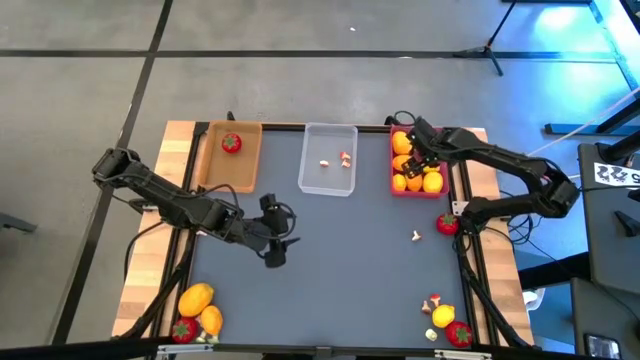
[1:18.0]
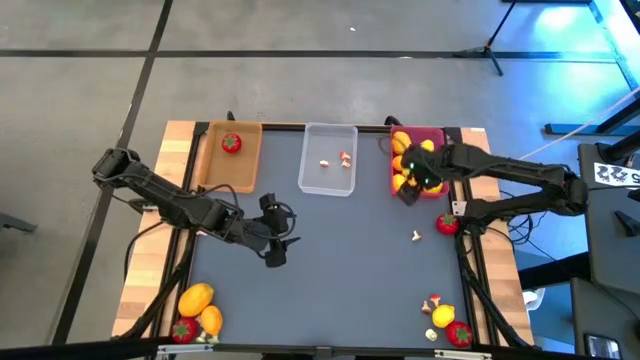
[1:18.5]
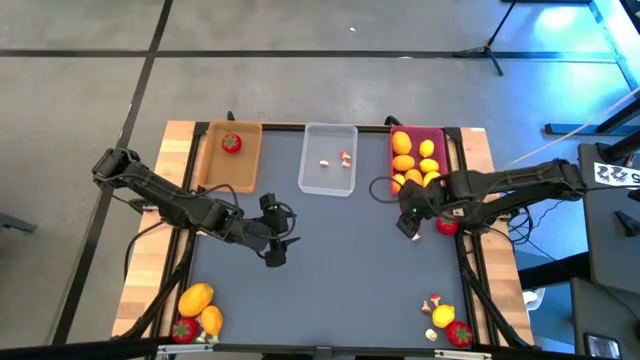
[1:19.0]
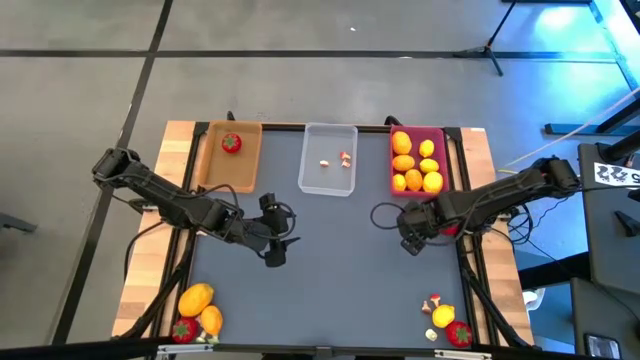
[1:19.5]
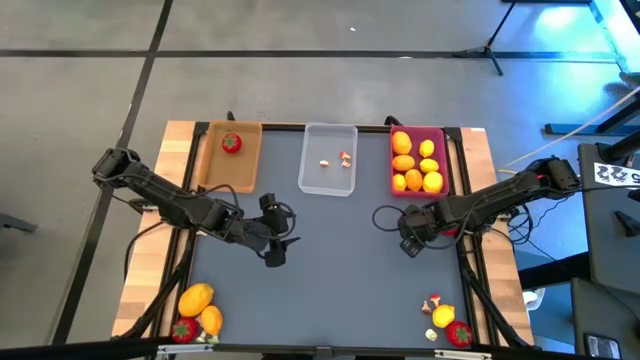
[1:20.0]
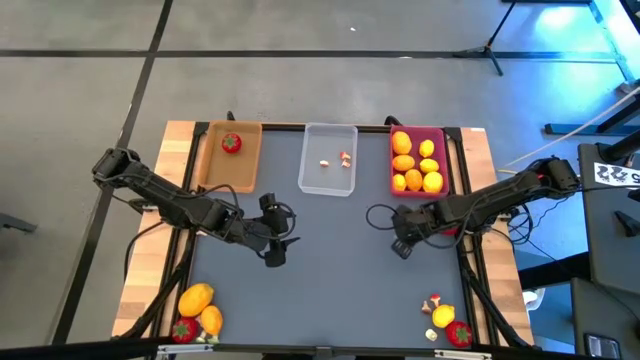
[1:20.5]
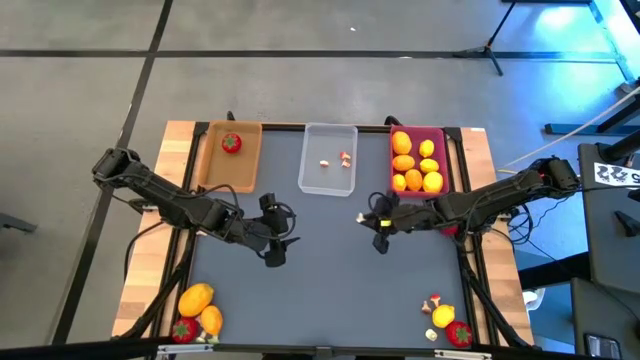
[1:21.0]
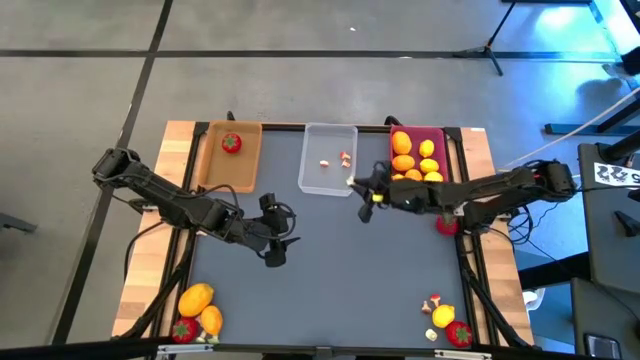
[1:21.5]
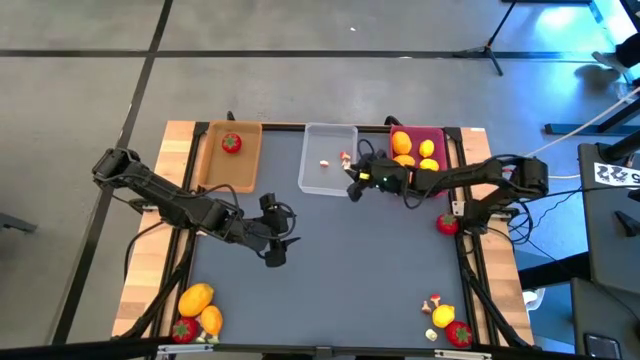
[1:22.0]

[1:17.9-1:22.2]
Task: Sort produce into baskets
Put the mushroom into the transparent bin

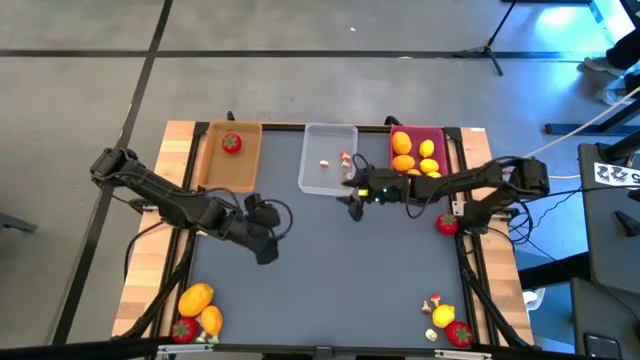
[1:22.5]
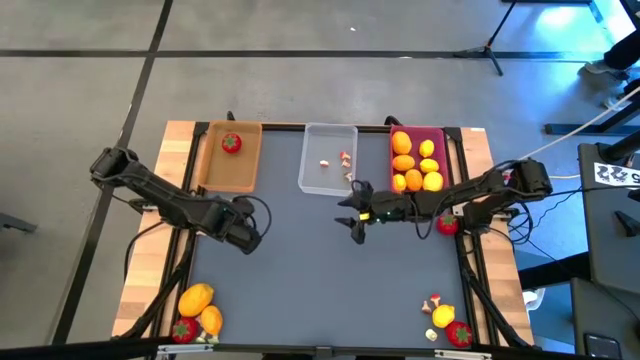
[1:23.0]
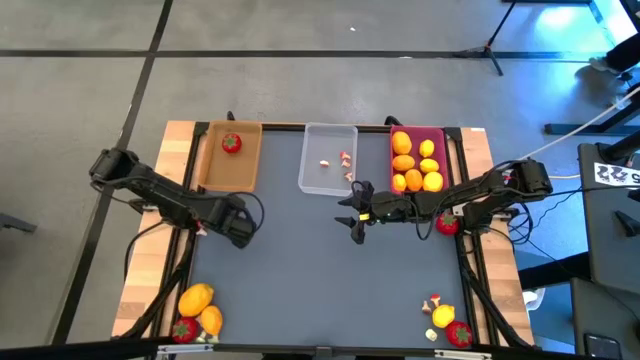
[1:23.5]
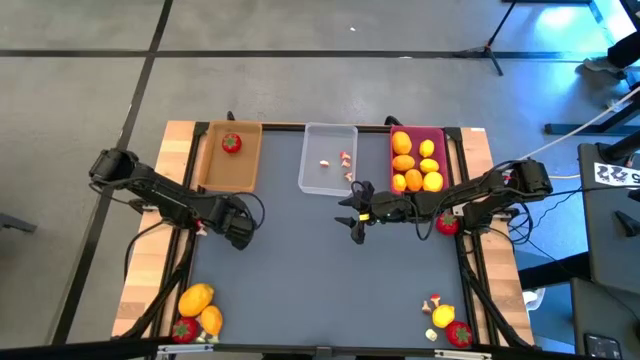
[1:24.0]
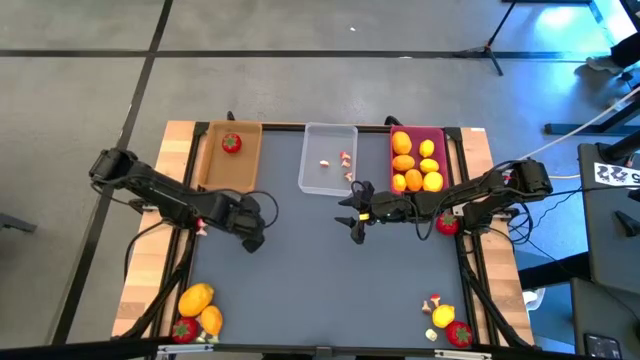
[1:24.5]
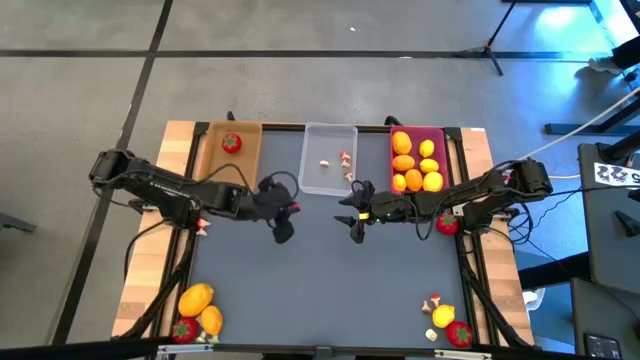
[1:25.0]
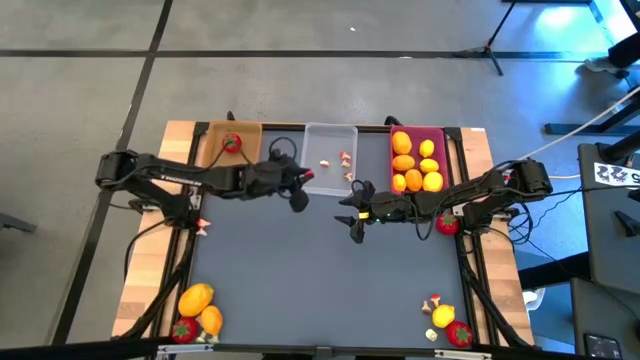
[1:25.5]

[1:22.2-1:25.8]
Put the mushroom into the transparent bin

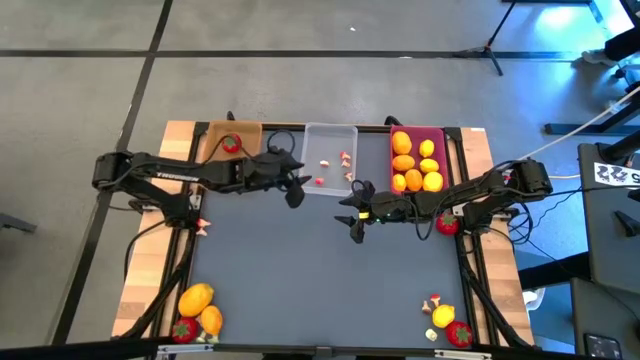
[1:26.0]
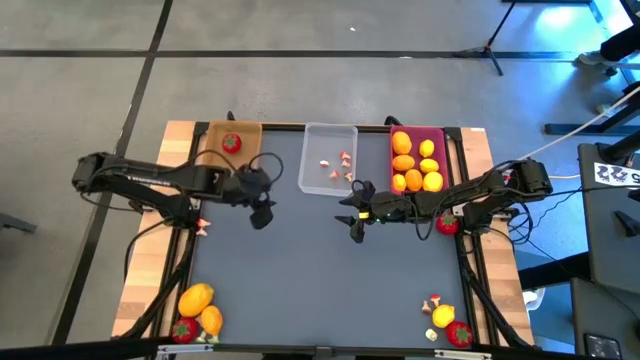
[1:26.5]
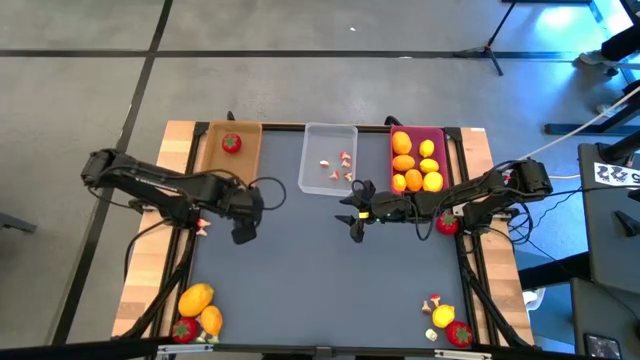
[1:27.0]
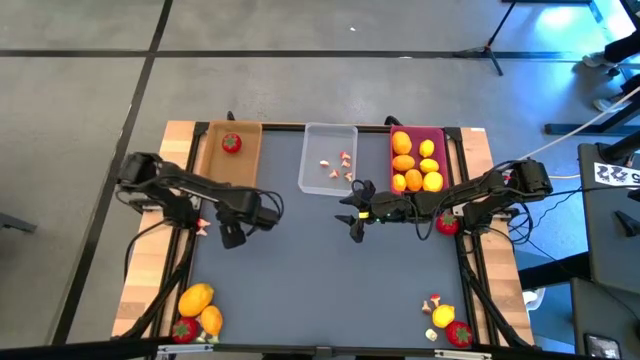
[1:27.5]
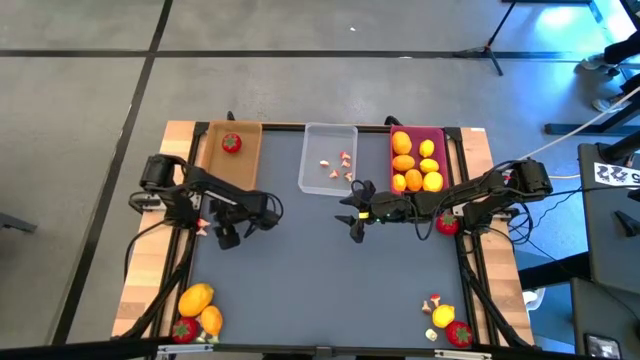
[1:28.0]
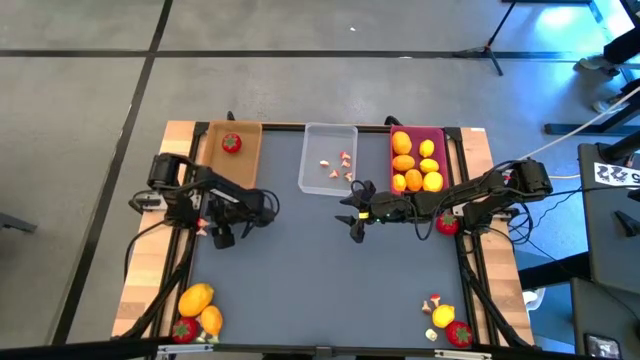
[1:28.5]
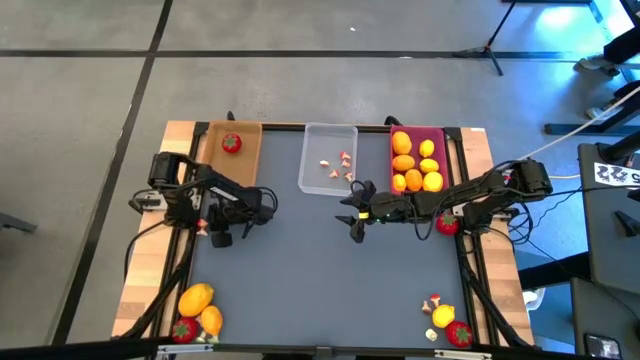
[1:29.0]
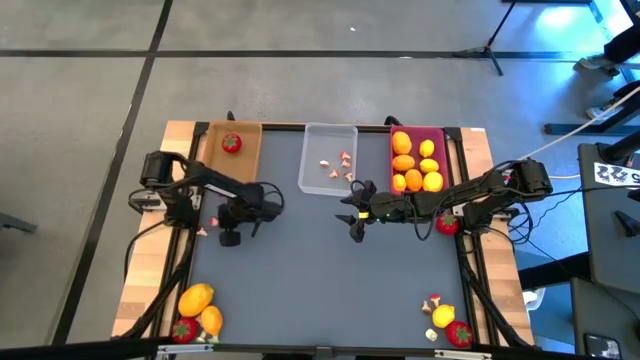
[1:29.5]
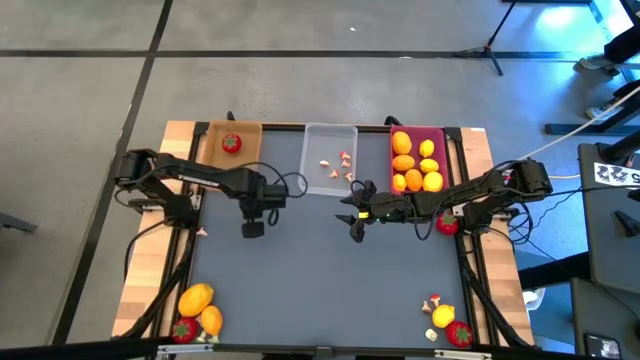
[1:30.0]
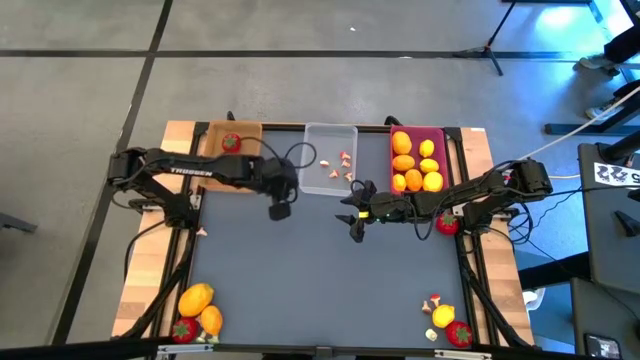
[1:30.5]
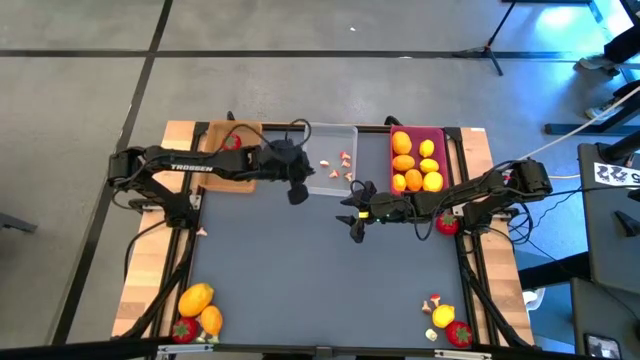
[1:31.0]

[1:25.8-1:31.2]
Put the mushroom into the transparent bin

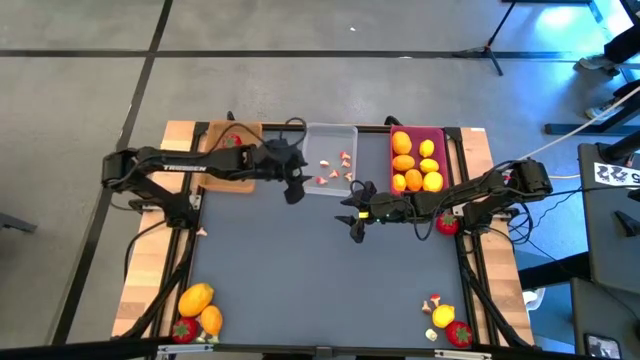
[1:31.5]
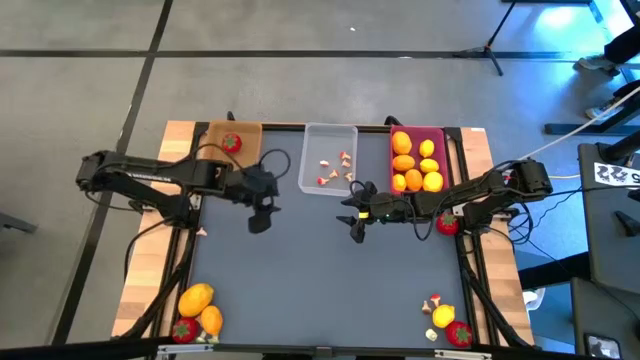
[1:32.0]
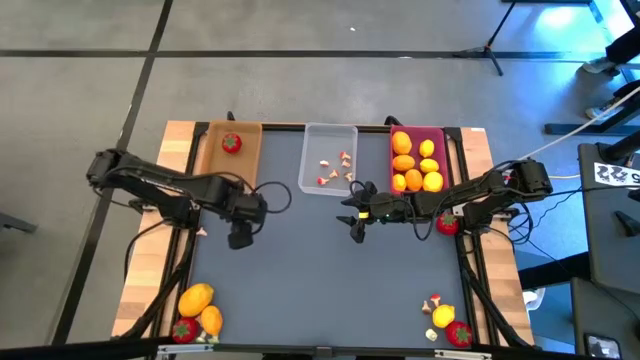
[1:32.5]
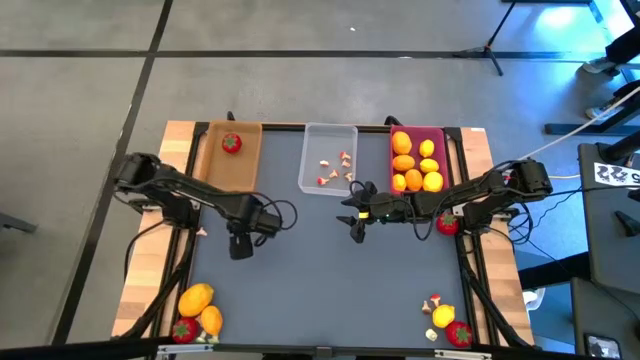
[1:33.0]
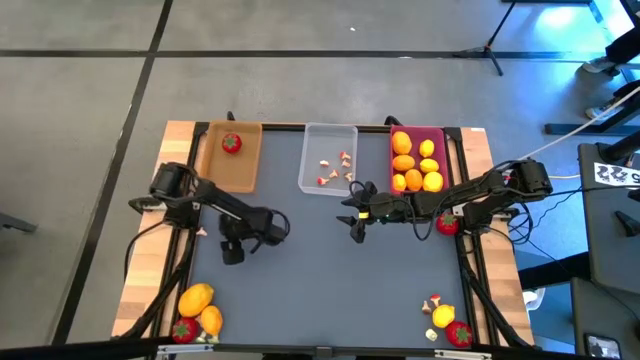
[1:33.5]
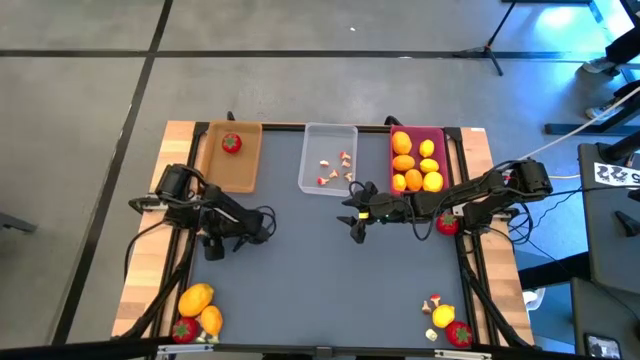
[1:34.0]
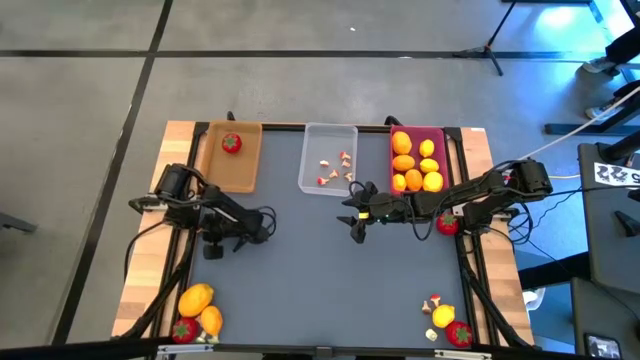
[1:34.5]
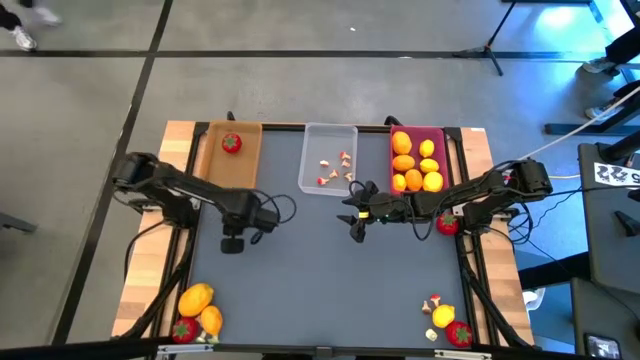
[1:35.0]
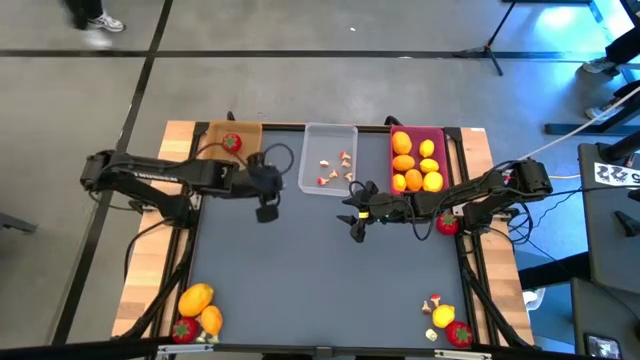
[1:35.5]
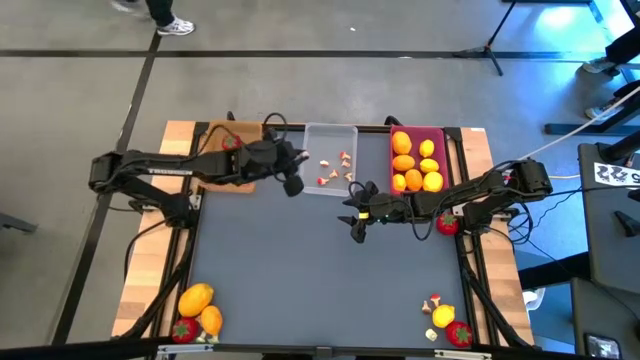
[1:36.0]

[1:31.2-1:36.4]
Put the mushroom into the transparent bin

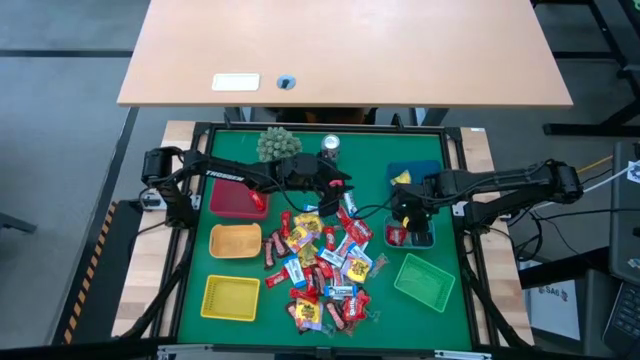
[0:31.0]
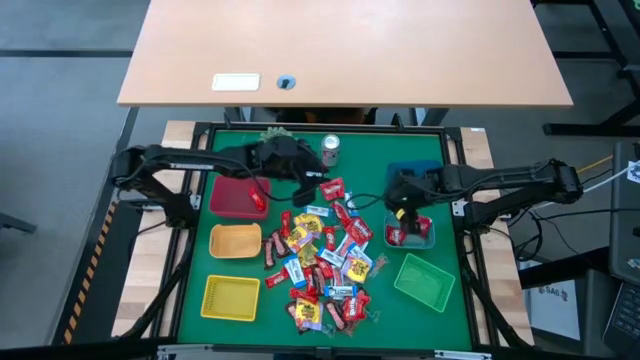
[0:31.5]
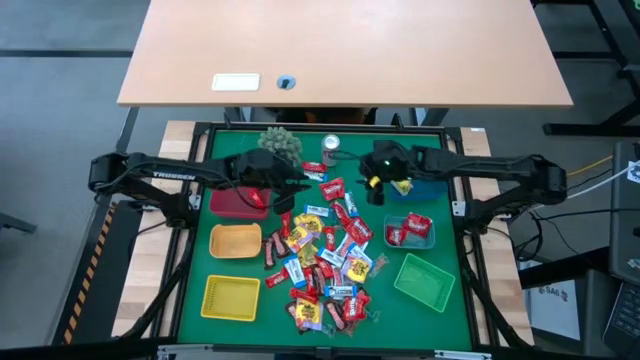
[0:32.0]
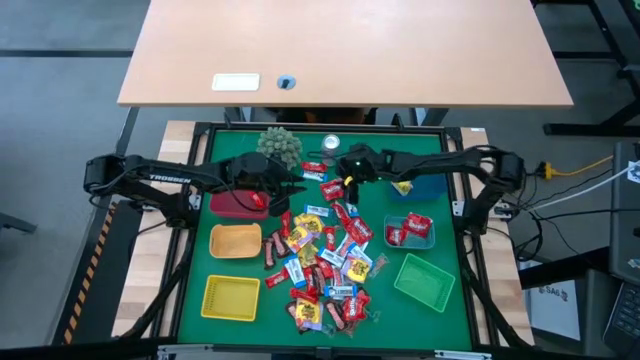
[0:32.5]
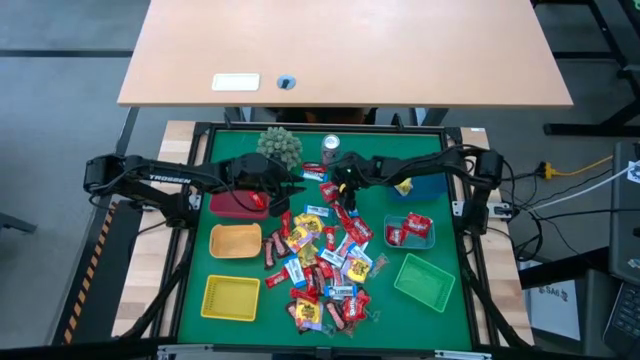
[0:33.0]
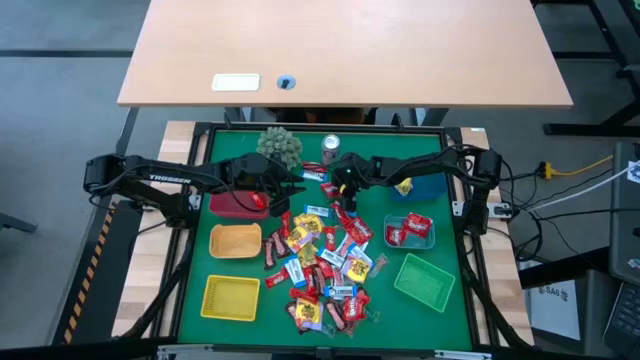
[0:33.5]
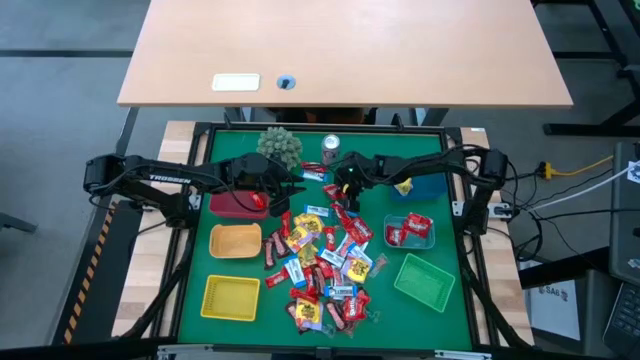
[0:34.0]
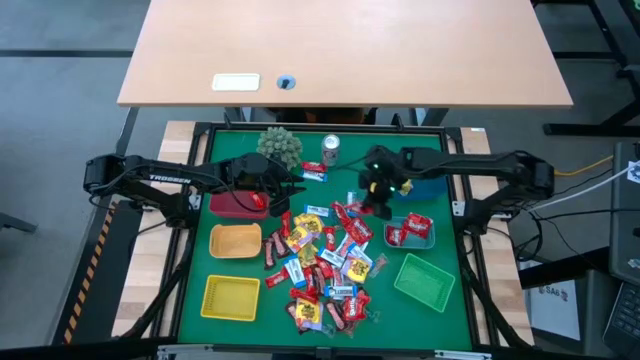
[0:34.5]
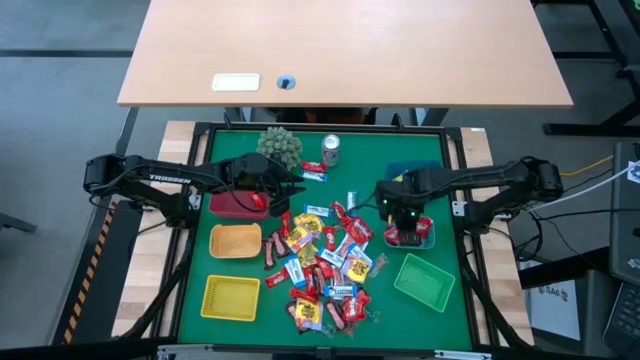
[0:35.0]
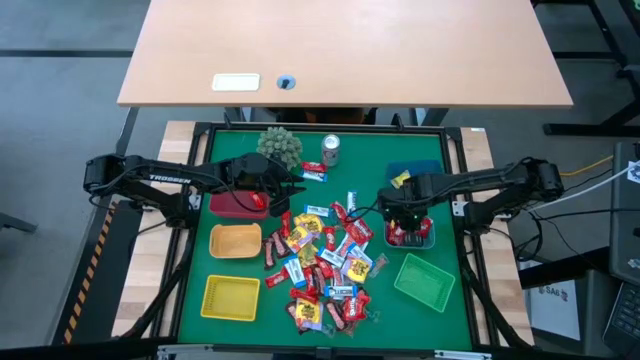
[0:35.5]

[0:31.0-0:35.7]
Task: Sort candy
Put the red candy into the light blue bin
